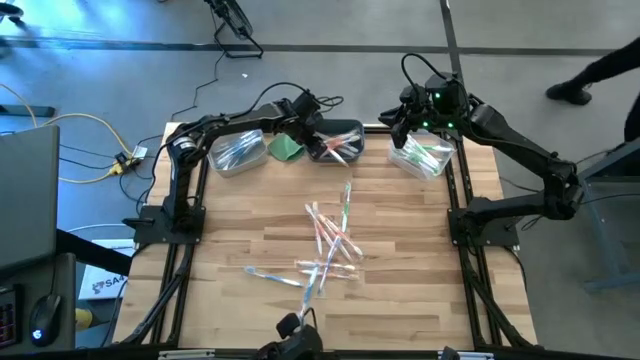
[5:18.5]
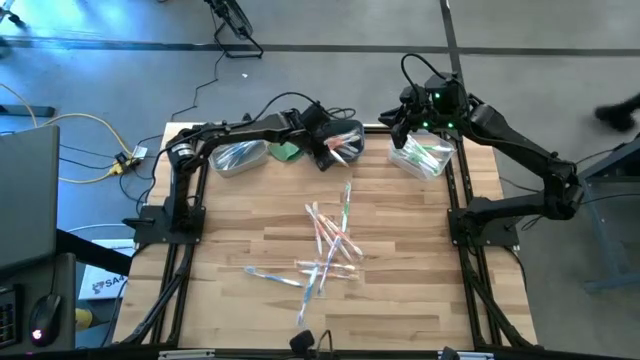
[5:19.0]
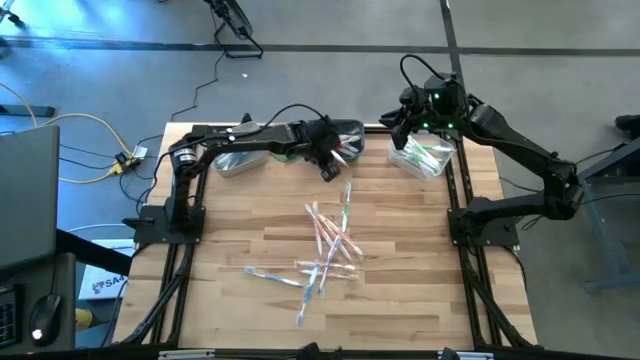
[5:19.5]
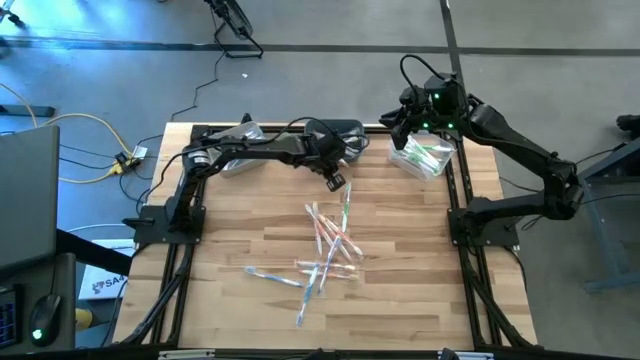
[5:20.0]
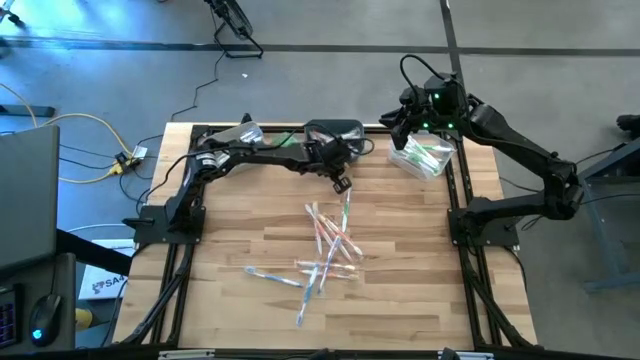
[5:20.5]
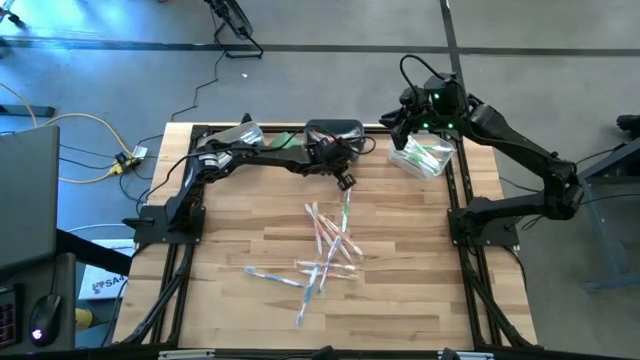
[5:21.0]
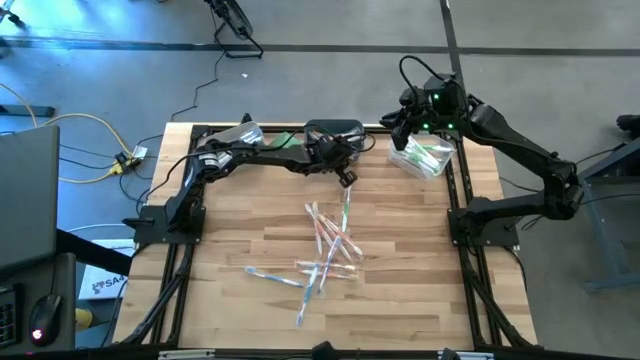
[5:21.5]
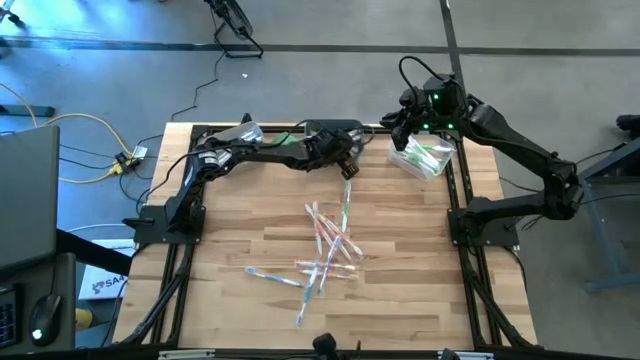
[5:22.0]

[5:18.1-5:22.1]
Task: Pick & Place Toothbrushes
Adjust the orange toothbrush in the blue bin

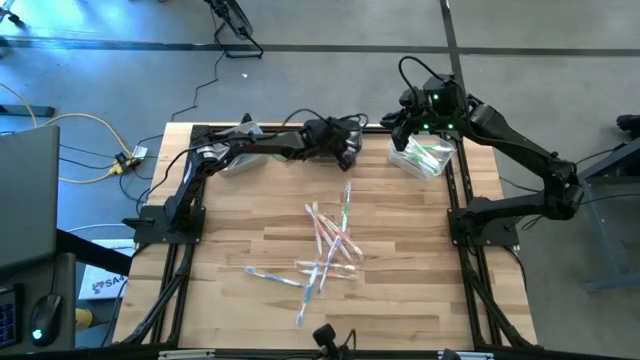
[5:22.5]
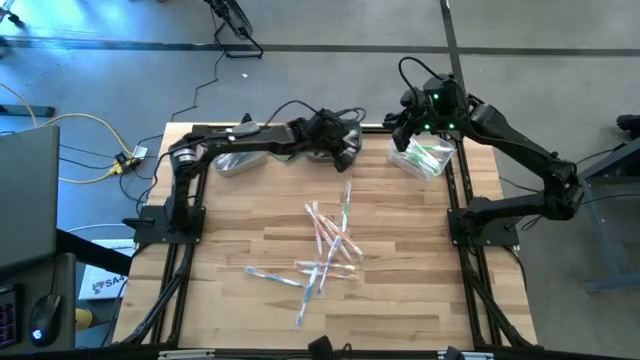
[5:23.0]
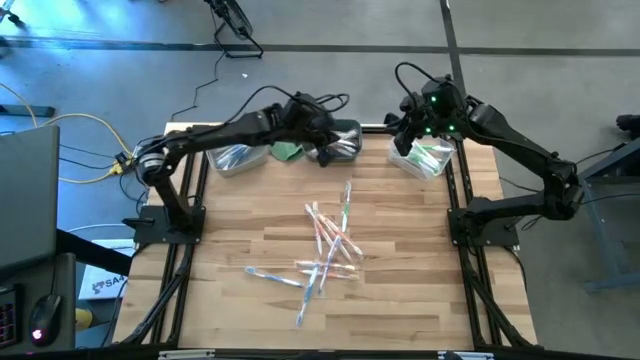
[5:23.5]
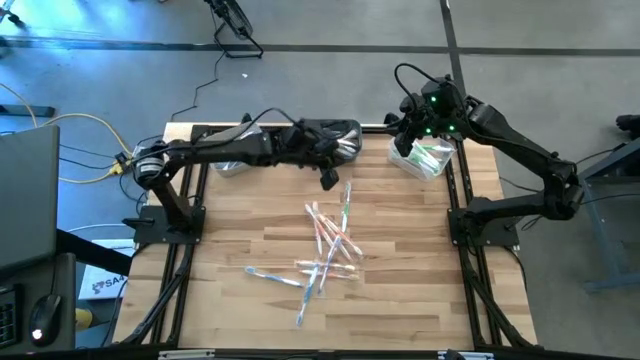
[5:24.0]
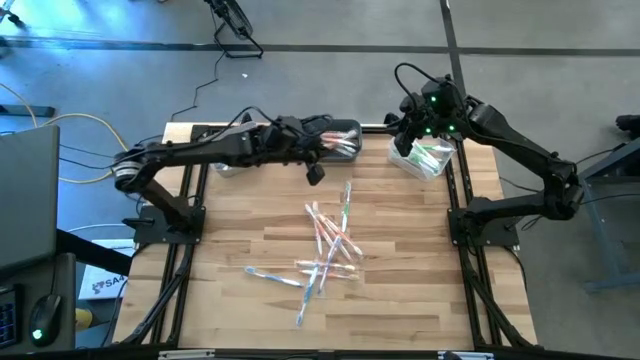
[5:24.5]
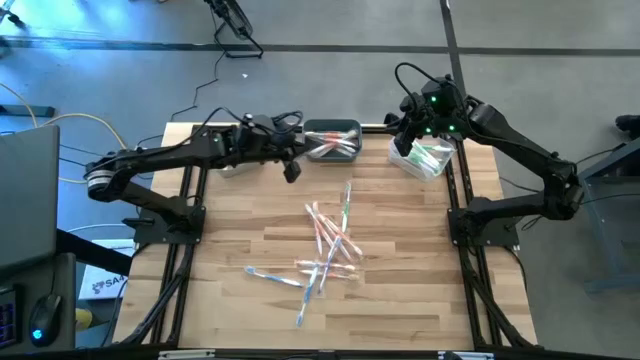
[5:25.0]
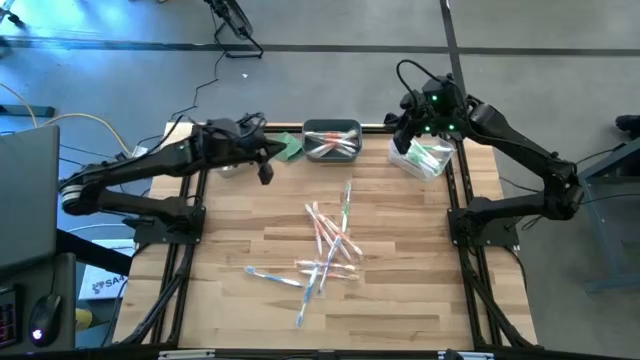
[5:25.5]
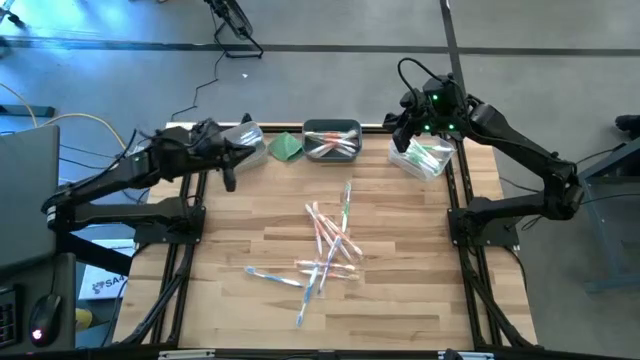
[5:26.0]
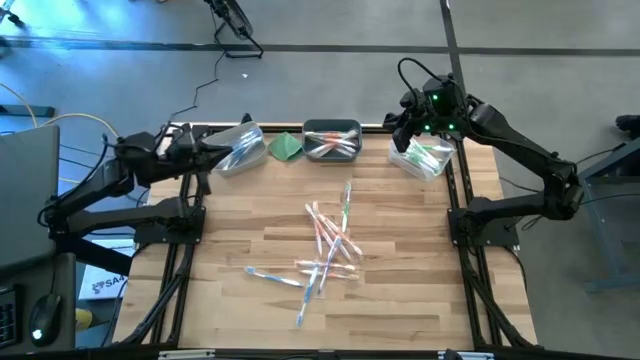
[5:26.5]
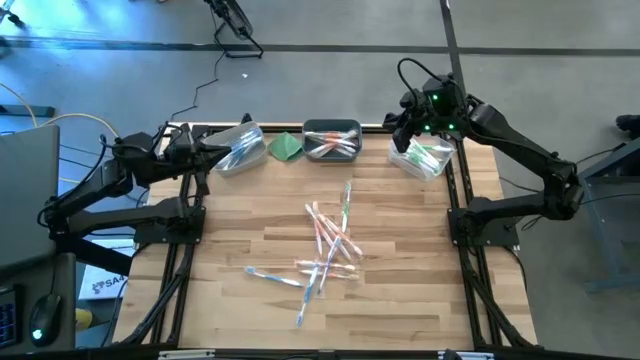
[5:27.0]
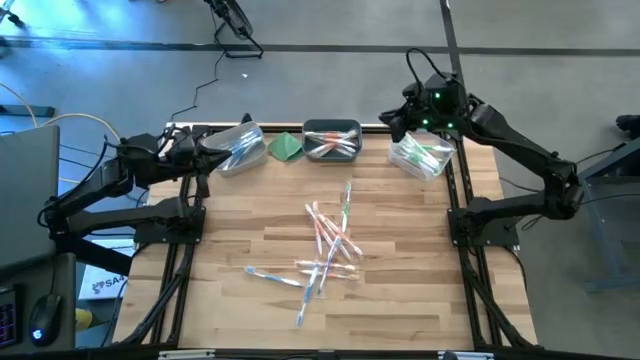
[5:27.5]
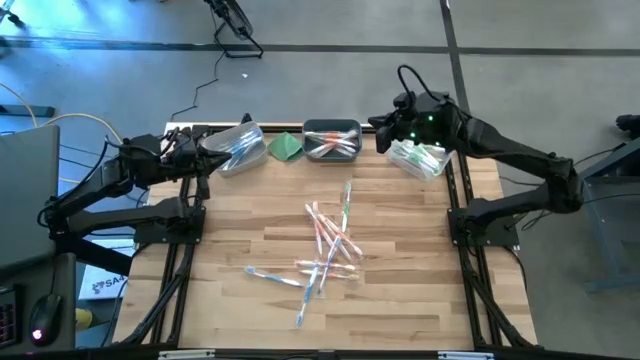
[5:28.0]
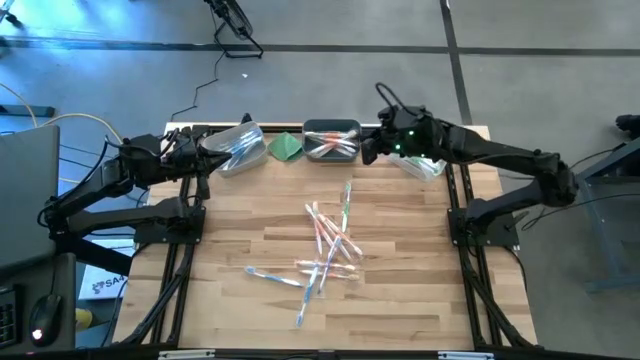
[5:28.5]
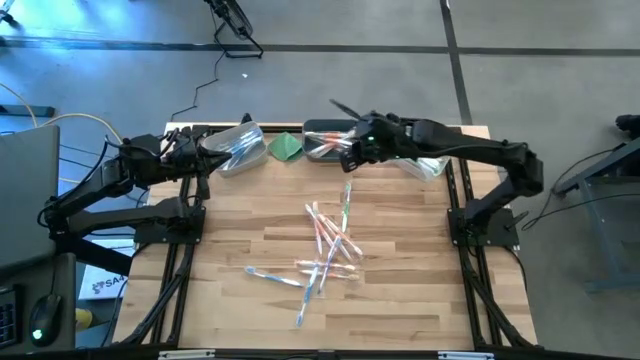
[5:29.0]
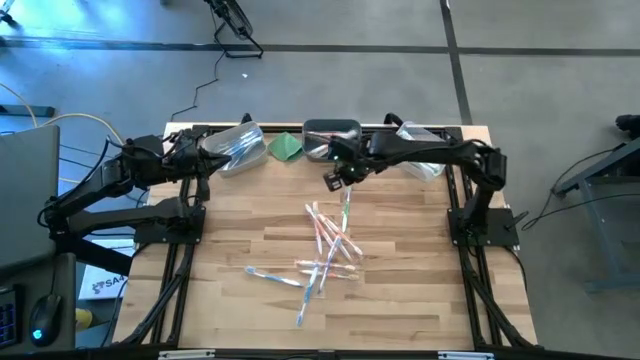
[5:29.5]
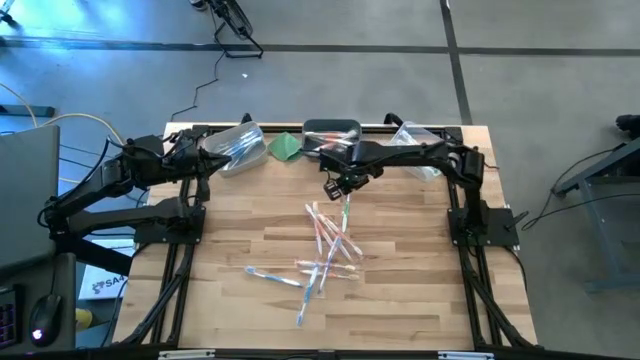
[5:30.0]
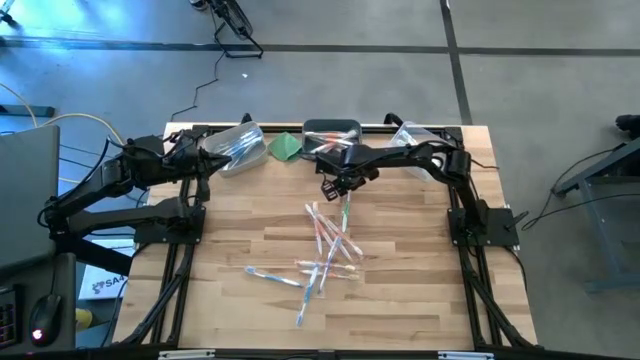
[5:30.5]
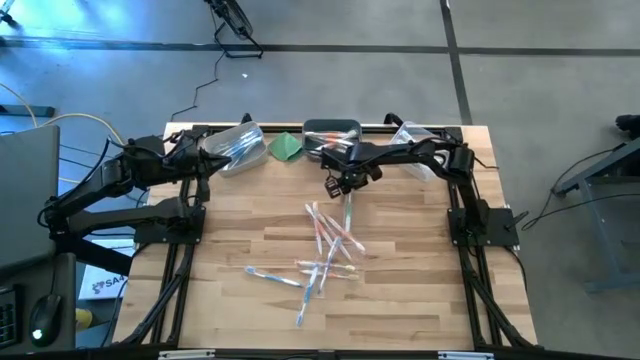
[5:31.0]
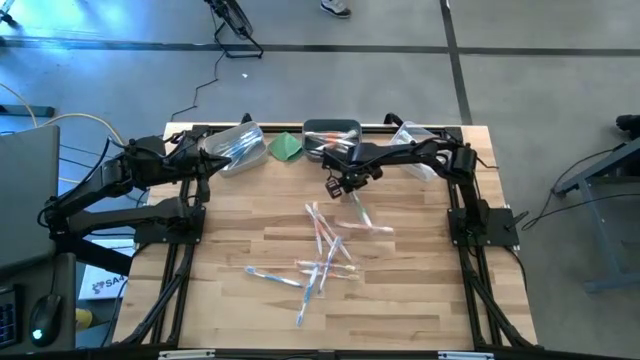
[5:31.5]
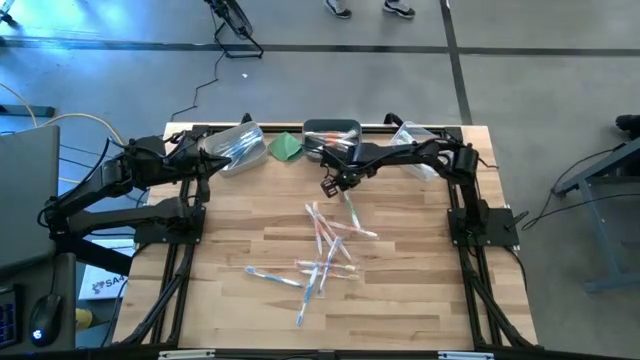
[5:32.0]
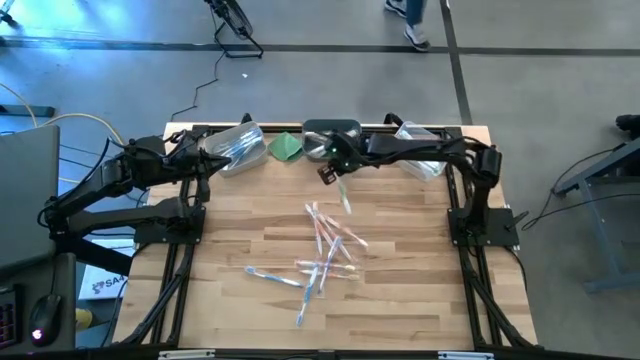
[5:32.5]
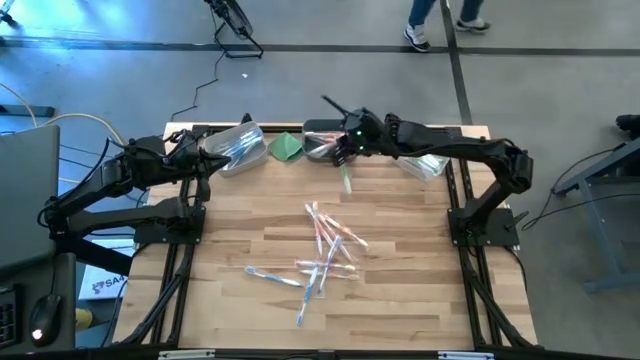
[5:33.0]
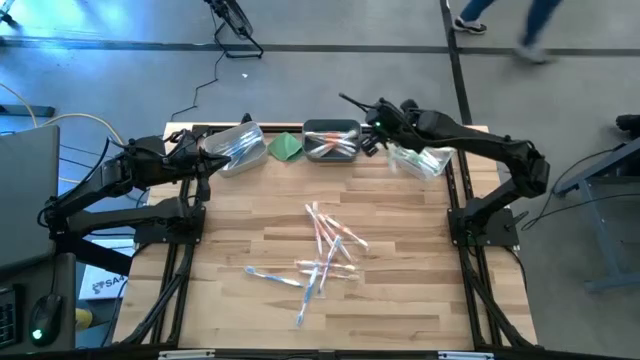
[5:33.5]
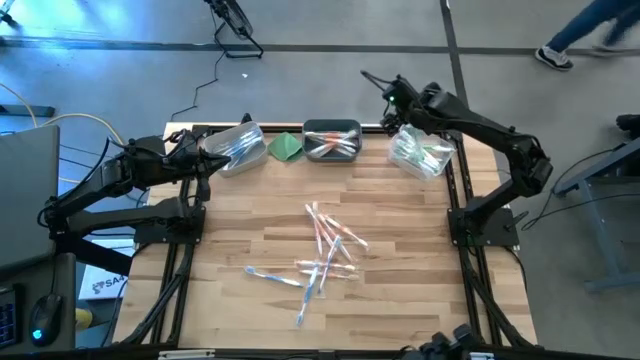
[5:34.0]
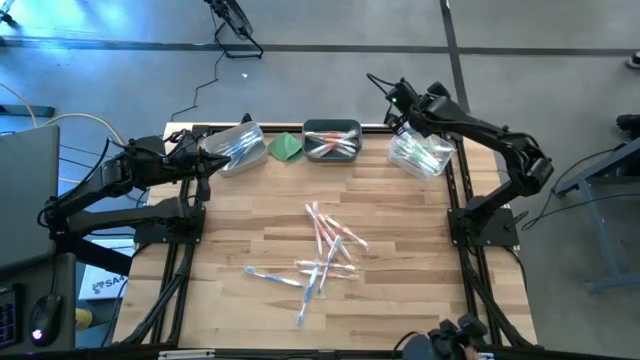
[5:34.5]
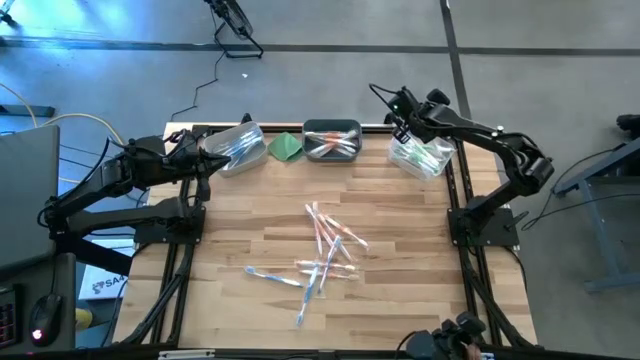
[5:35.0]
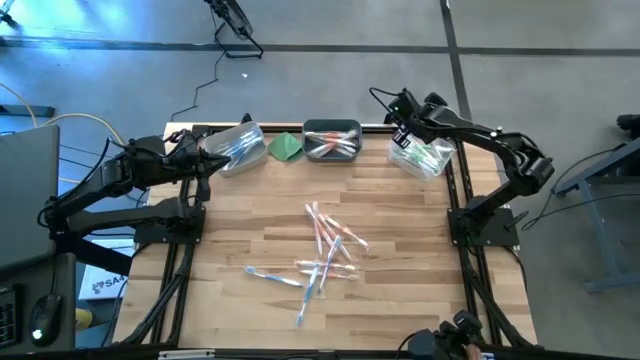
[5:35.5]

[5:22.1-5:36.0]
Put the green toothbrush into the transparent bin

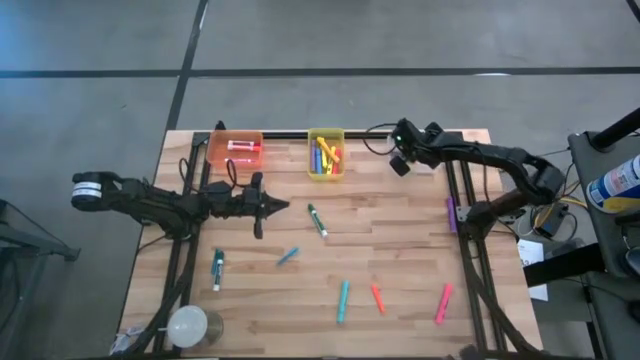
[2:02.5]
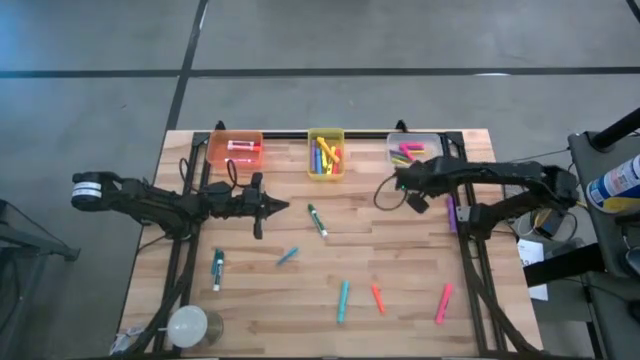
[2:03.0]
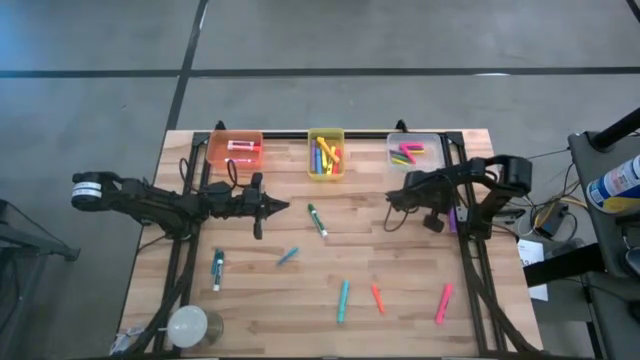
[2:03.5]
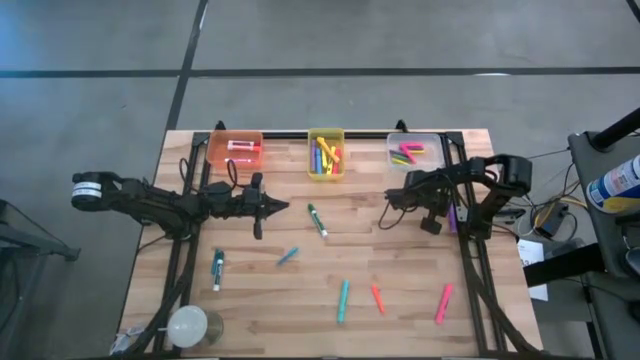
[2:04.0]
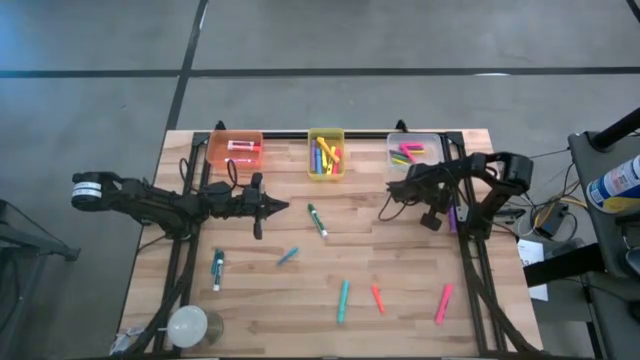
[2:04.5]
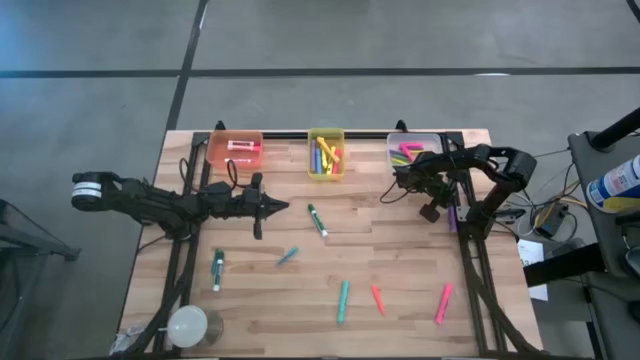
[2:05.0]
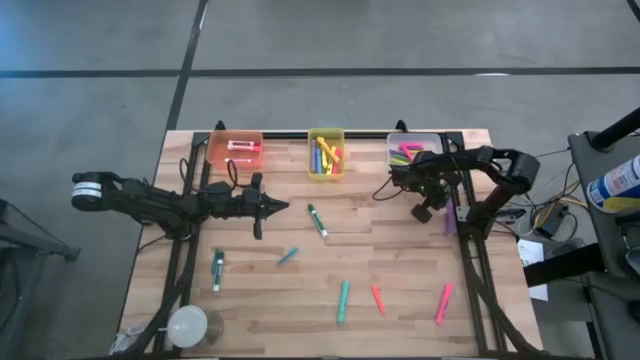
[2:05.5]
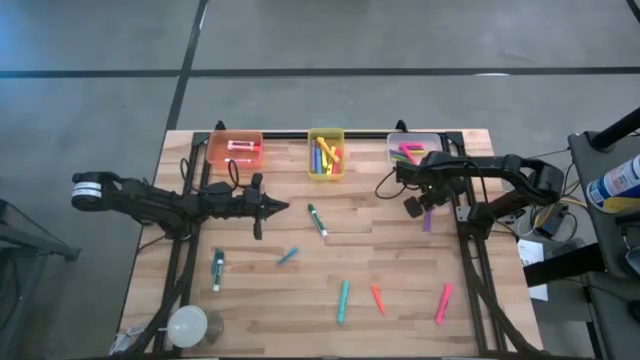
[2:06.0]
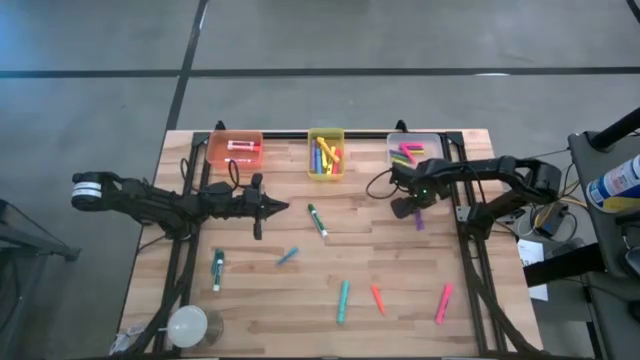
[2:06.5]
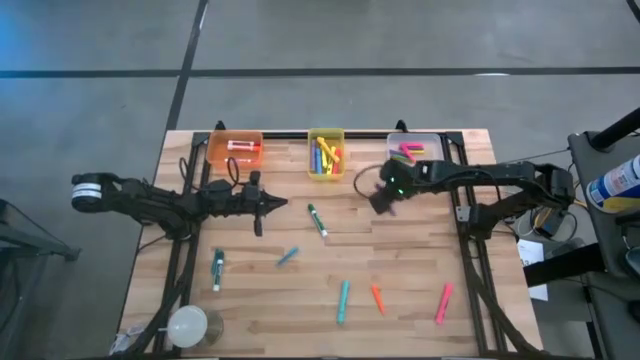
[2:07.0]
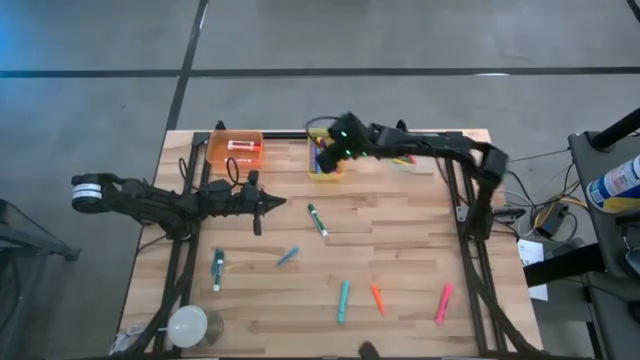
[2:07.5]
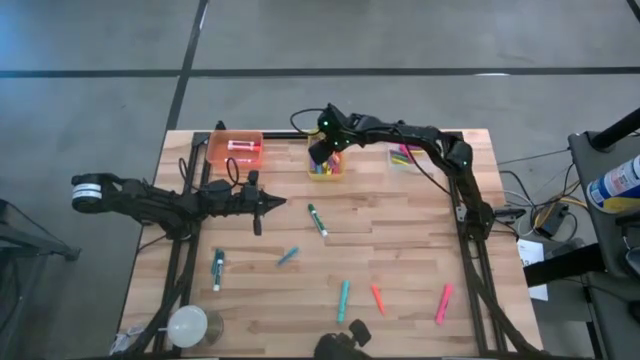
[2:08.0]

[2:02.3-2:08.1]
Task: Pick & Place Markers
Put the purple highlighter pen into the yellow bin
